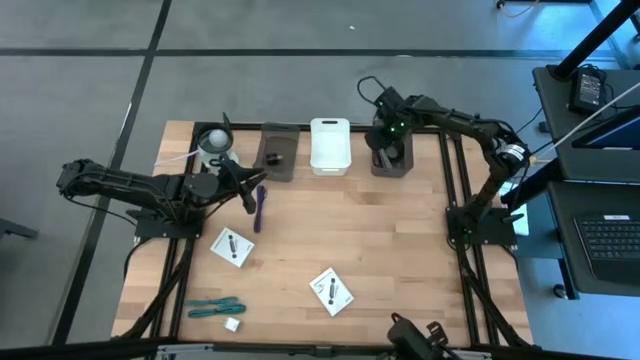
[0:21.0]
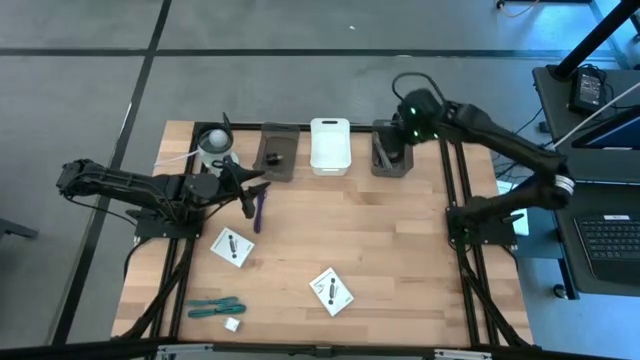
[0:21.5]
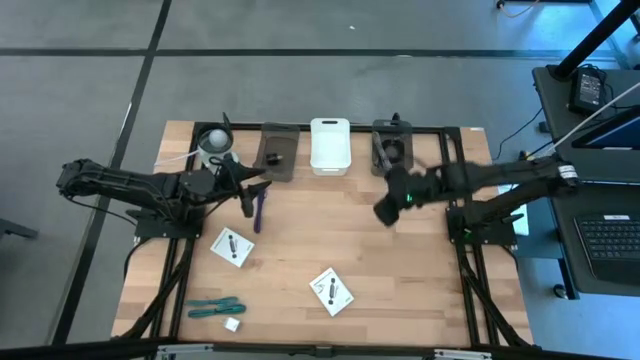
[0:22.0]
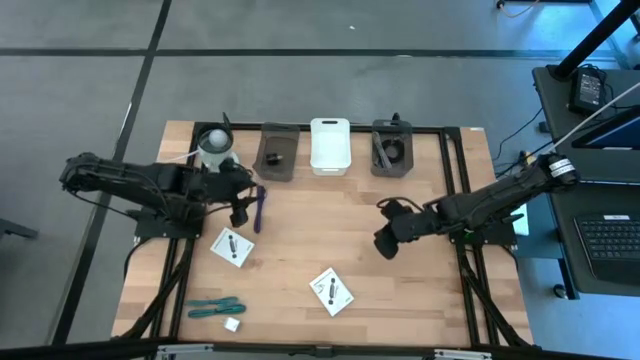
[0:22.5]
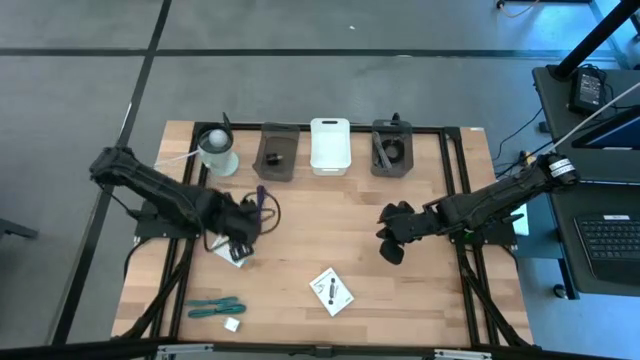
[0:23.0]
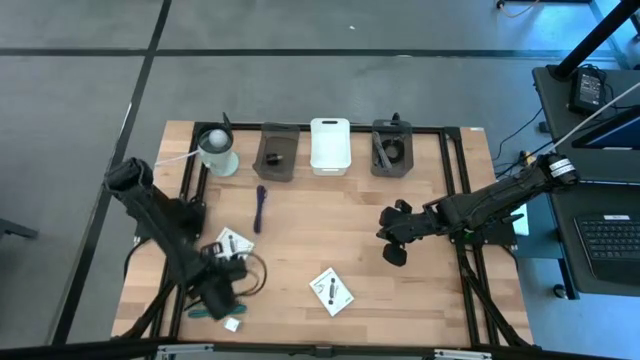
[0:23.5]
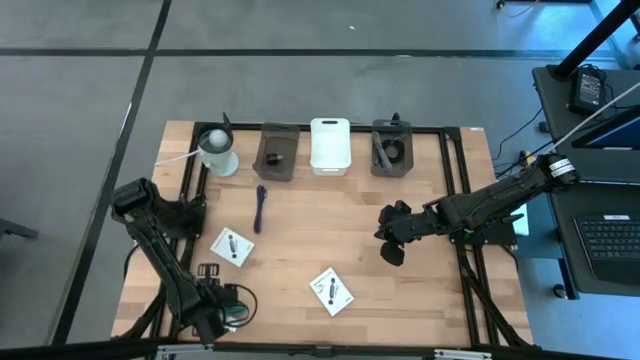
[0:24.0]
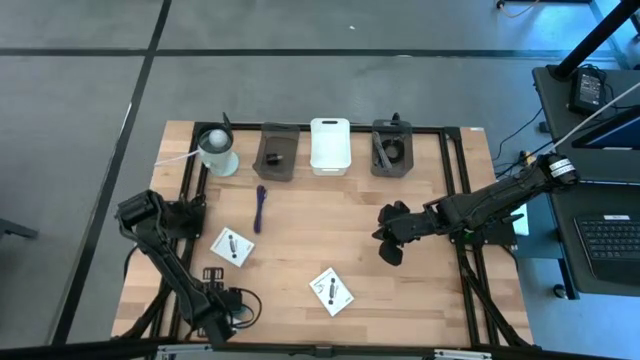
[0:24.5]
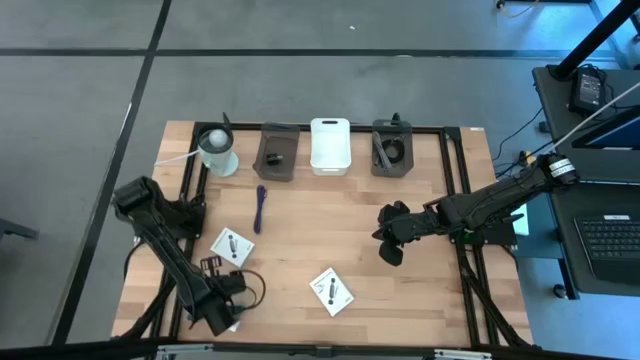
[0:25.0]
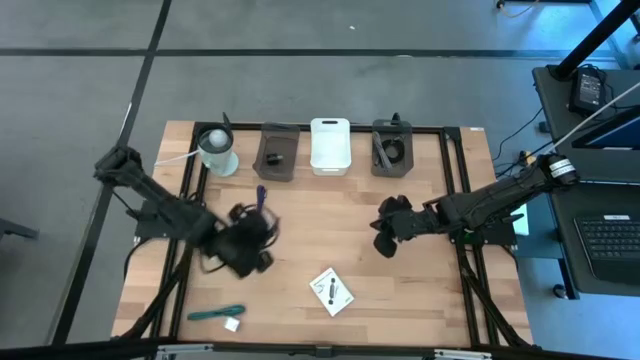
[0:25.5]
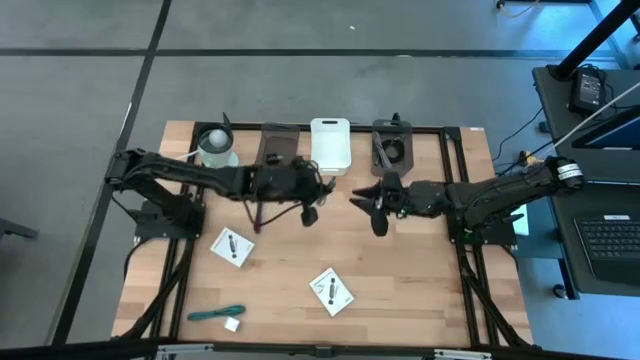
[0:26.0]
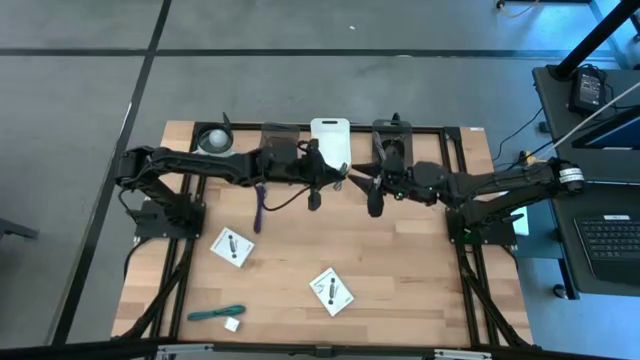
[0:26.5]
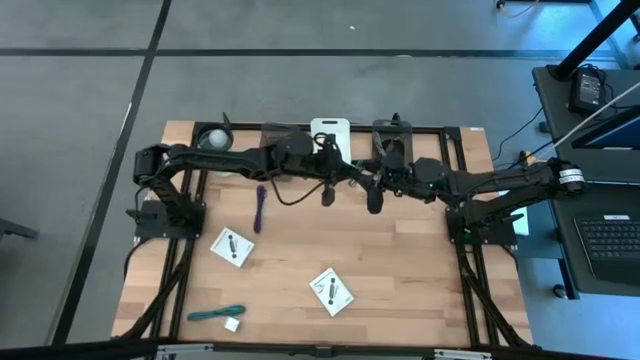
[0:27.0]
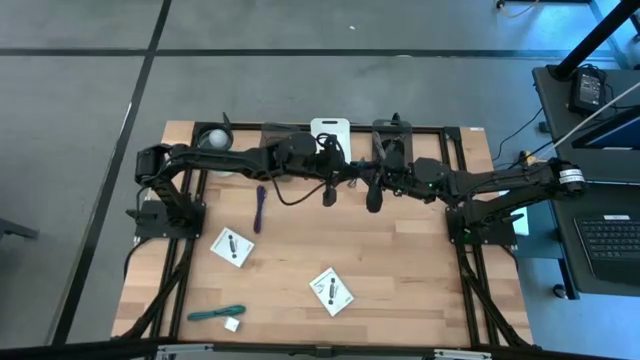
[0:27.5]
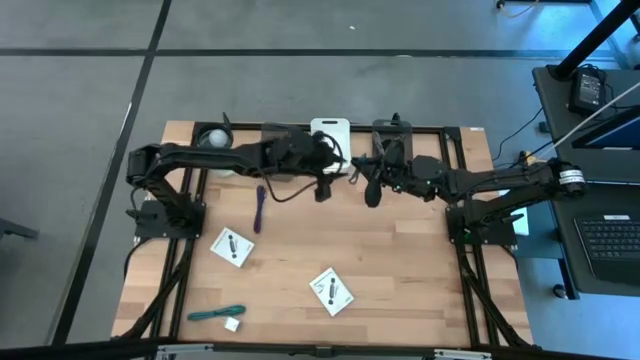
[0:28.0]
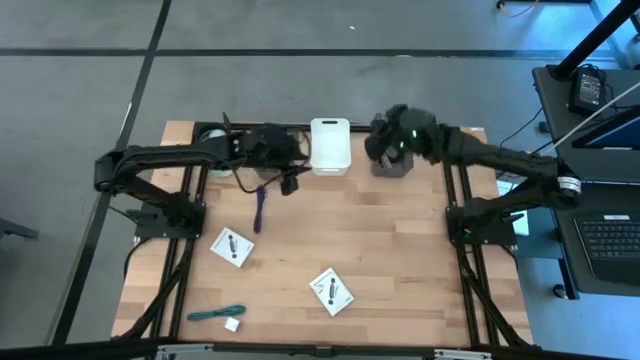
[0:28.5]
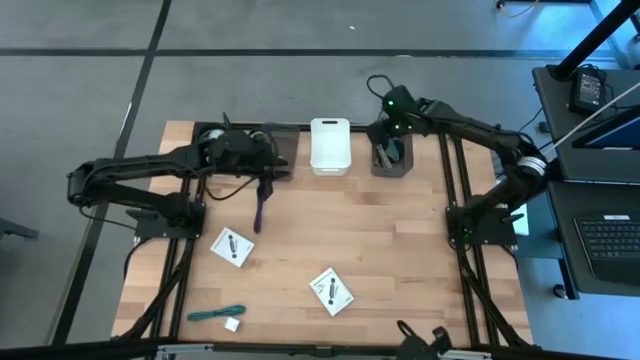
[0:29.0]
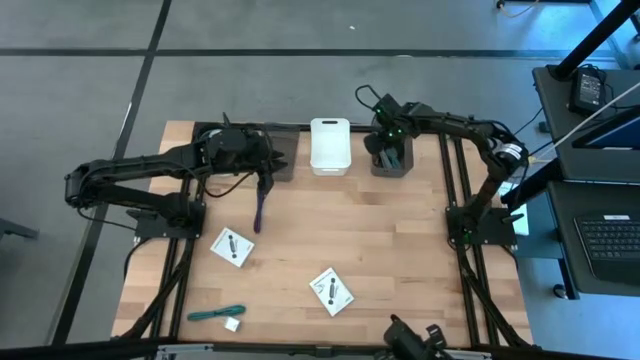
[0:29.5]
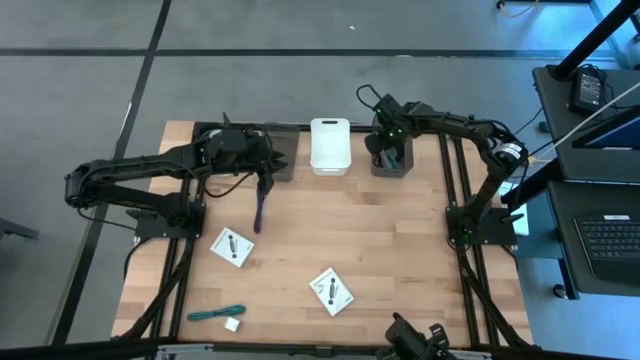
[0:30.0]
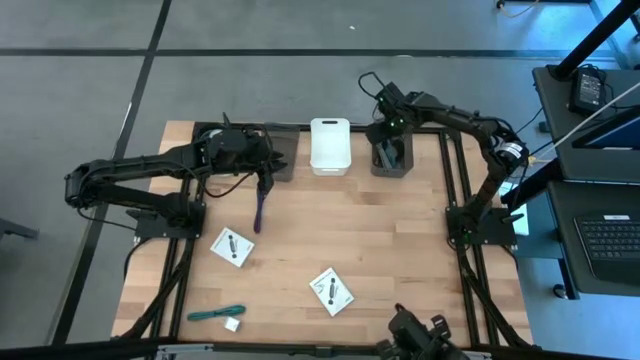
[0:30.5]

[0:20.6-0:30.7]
Task: Pick and place items into bin
Put the top blue charger cable into the right black bin

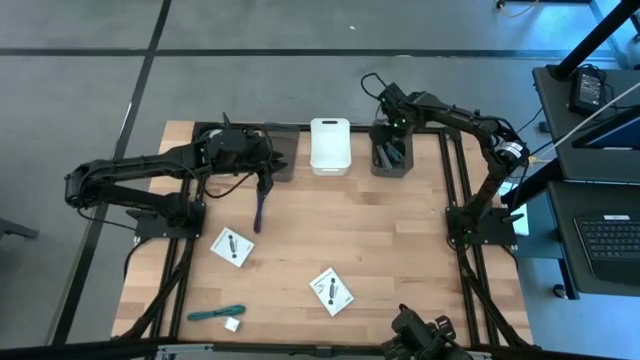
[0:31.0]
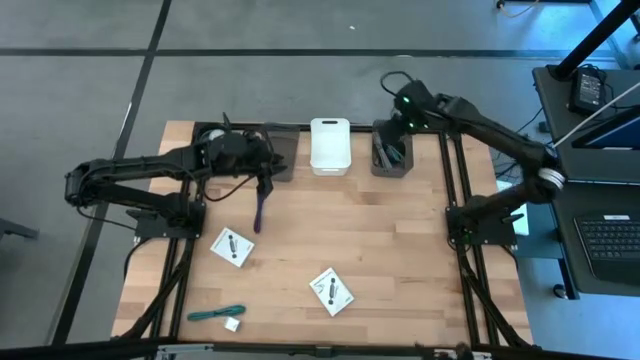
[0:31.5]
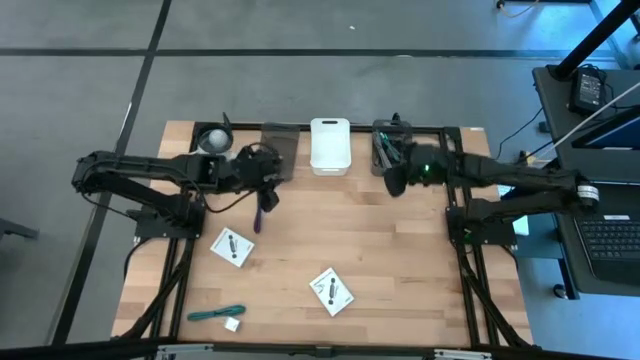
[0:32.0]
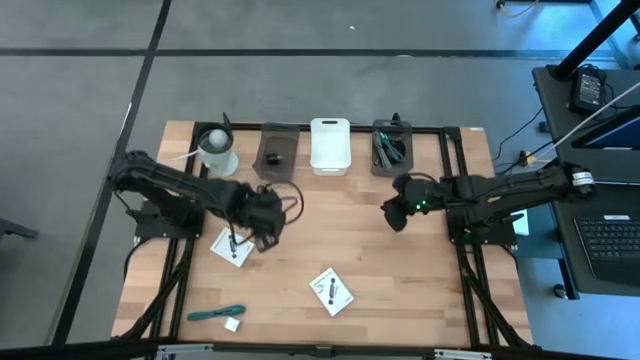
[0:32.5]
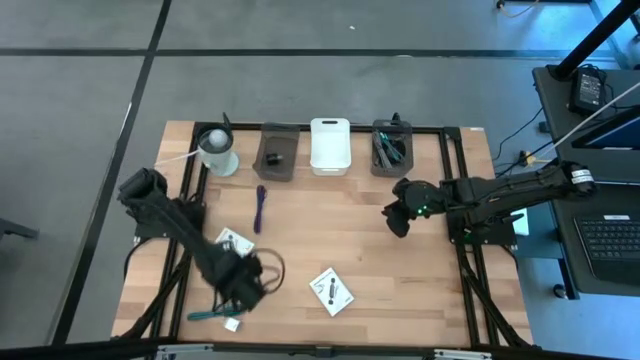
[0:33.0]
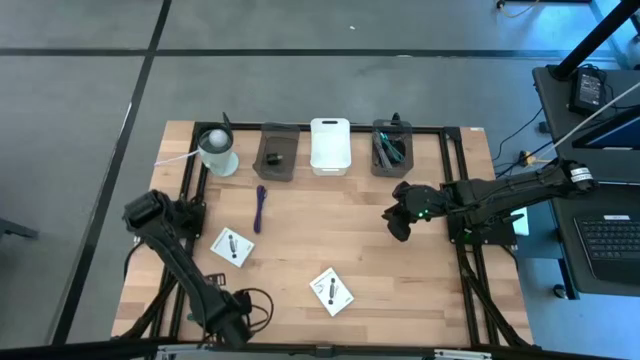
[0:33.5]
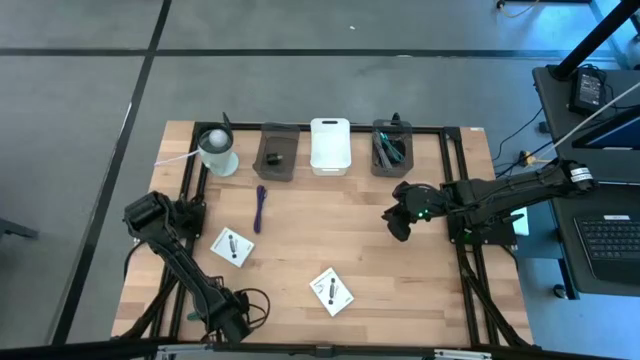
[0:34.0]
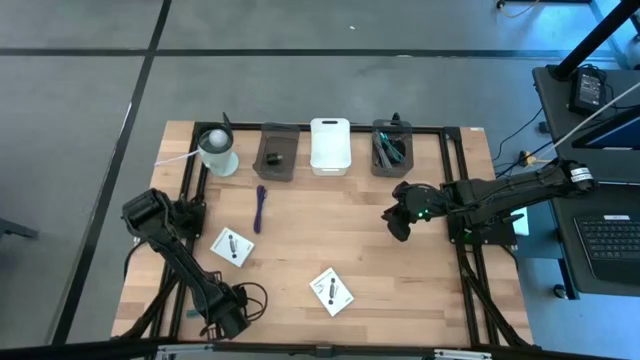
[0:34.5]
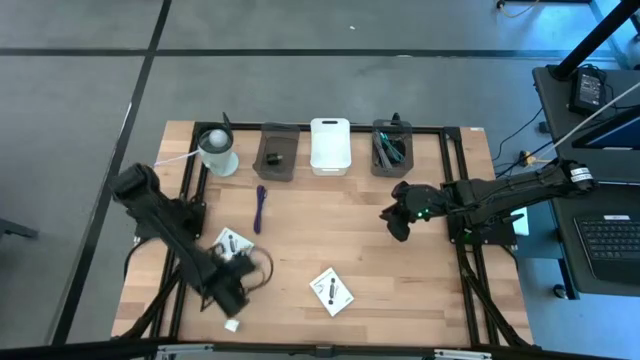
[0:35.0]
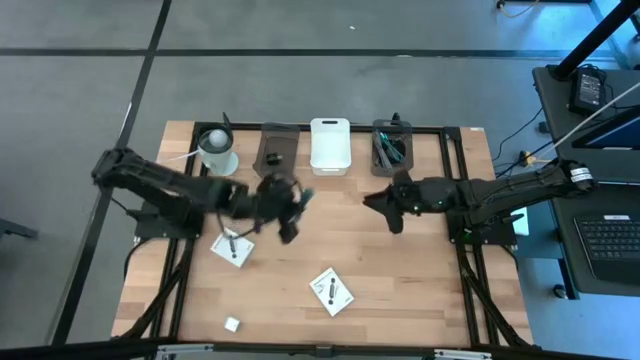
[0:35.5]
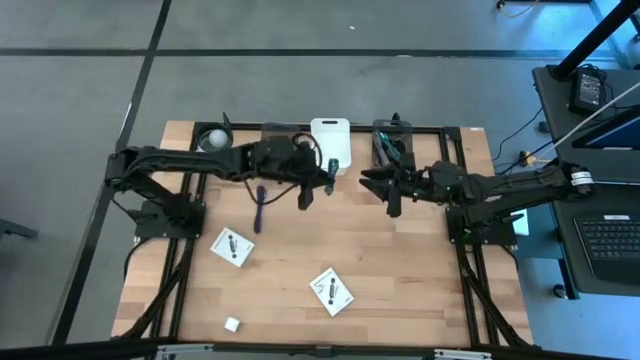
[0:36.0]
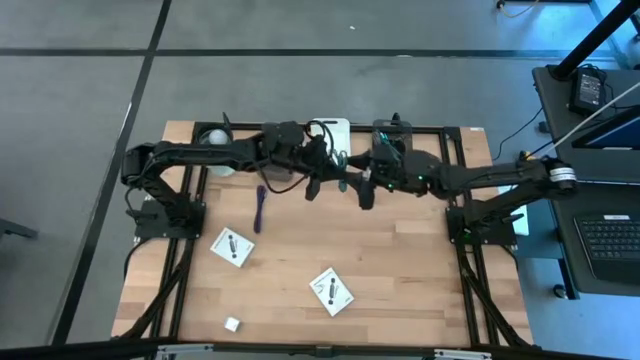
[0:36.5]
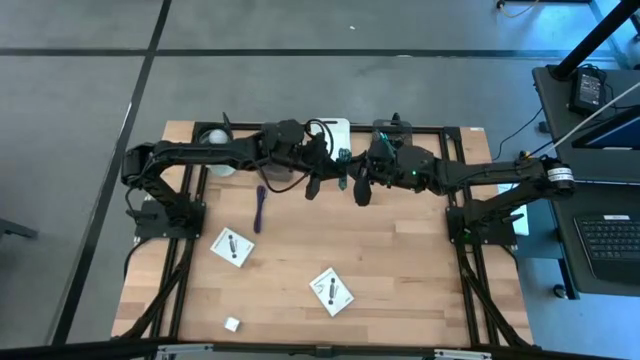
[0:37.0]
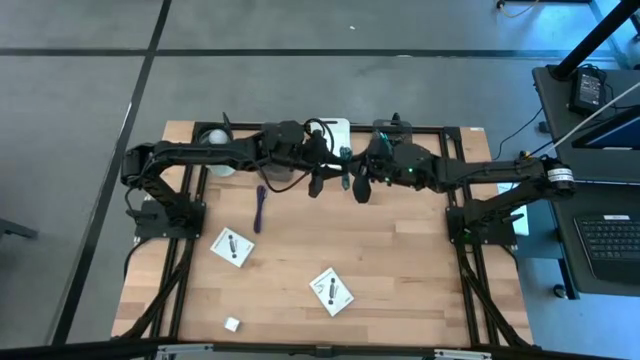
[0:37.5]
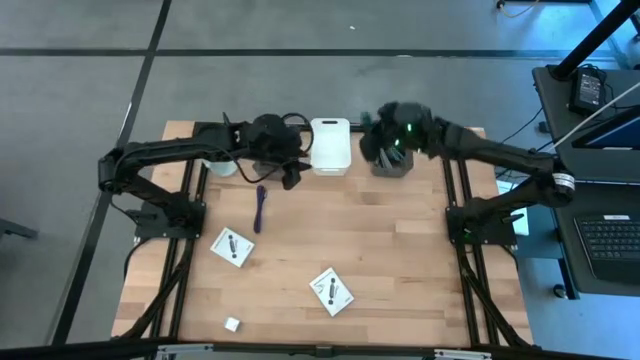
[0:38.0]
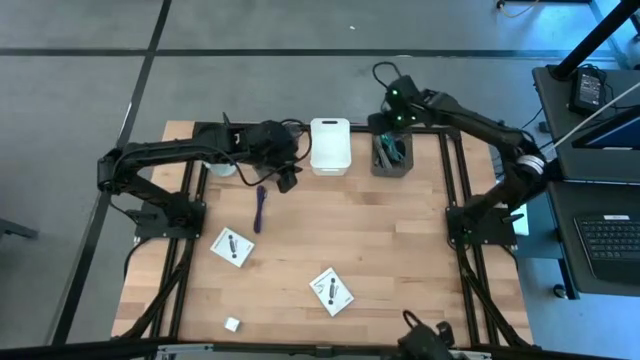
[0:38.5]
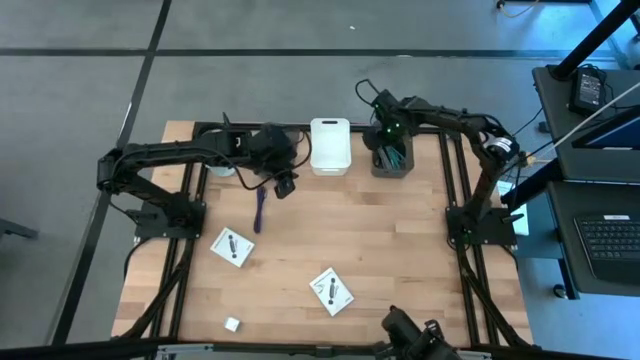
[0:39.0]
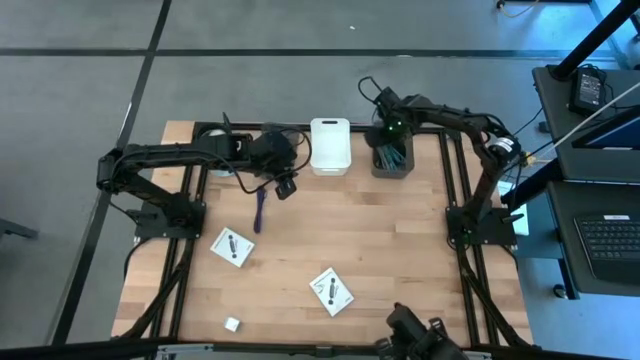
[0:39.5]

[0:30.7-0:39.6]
Put the blue charger cable into the right black bin

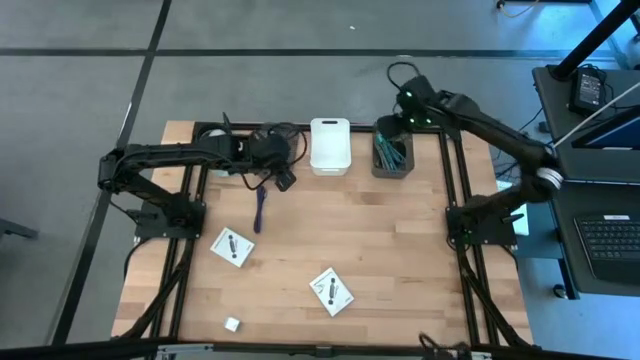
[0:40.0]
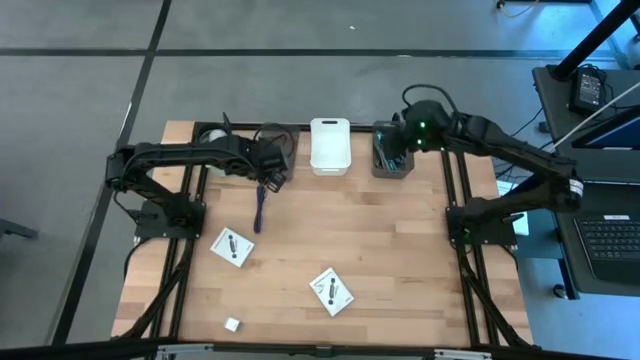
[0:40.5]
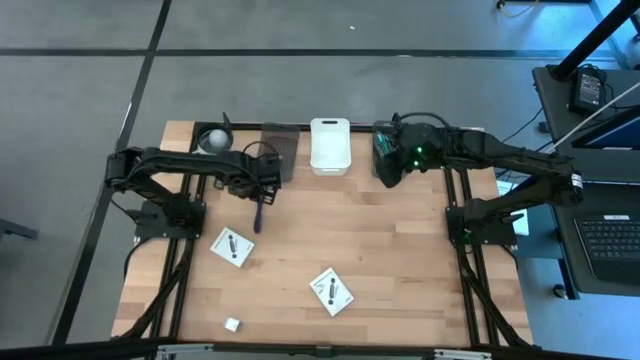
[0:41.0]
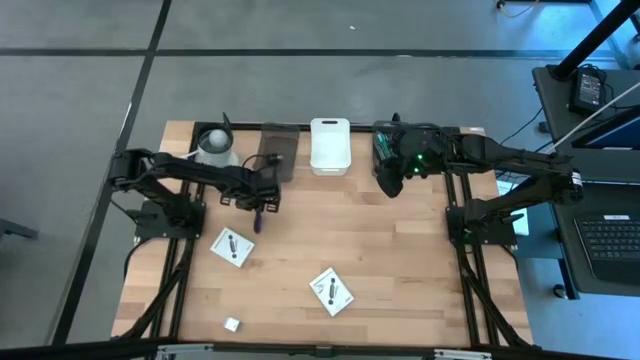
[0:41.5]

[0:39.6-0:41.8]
Put the purple charger cable into the right black bin
